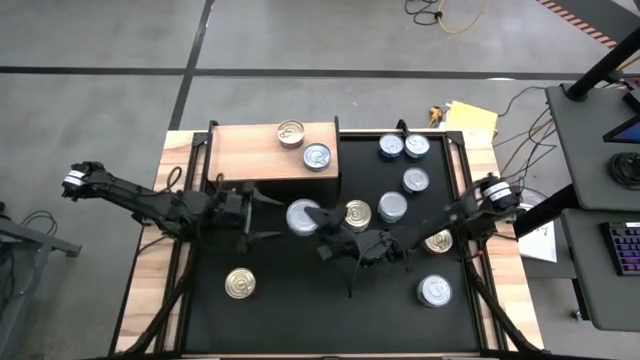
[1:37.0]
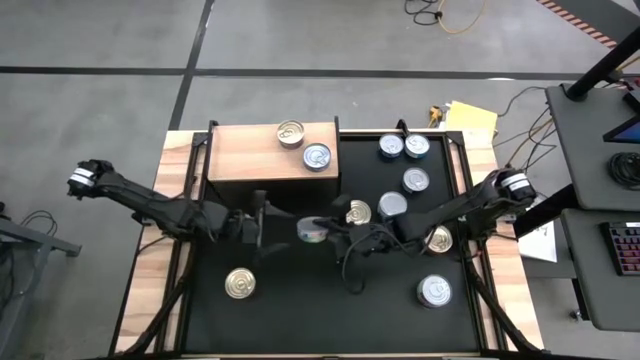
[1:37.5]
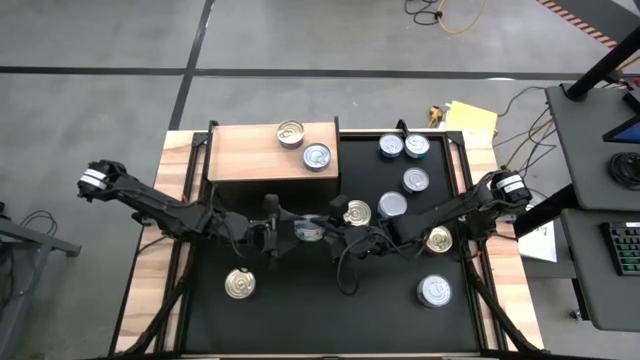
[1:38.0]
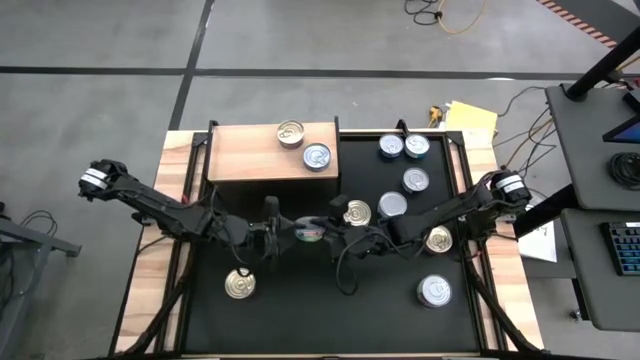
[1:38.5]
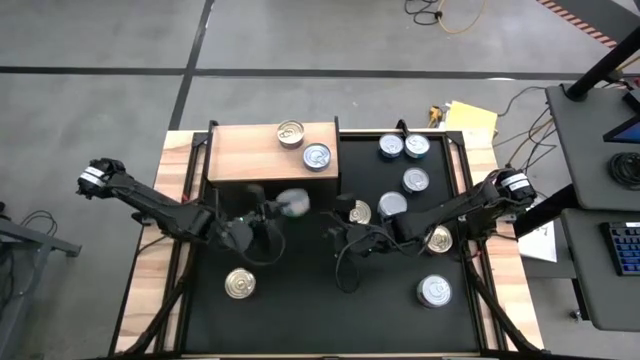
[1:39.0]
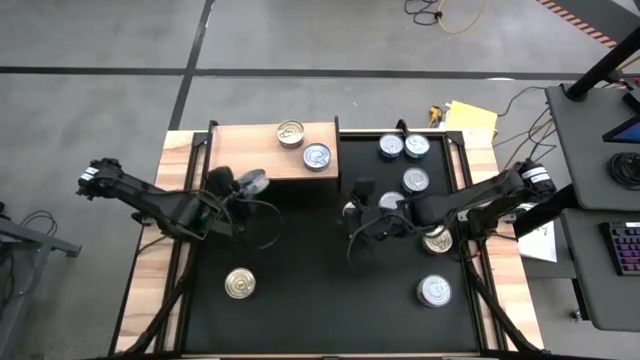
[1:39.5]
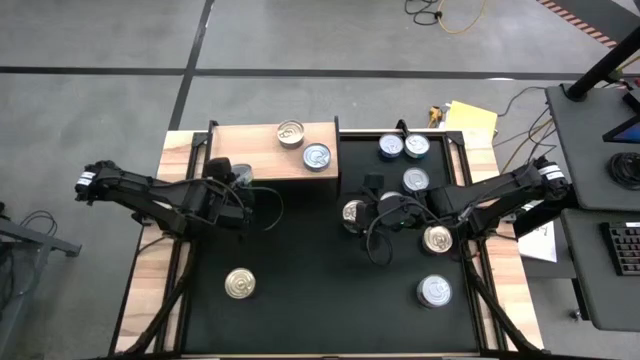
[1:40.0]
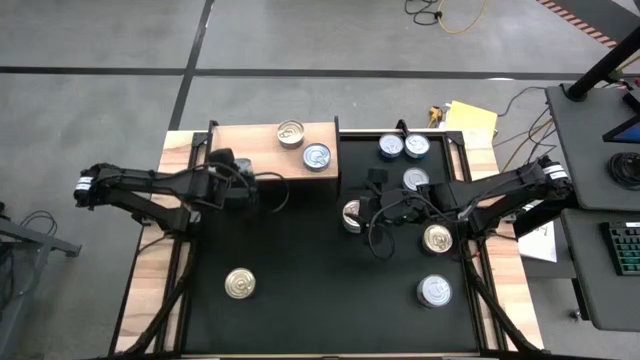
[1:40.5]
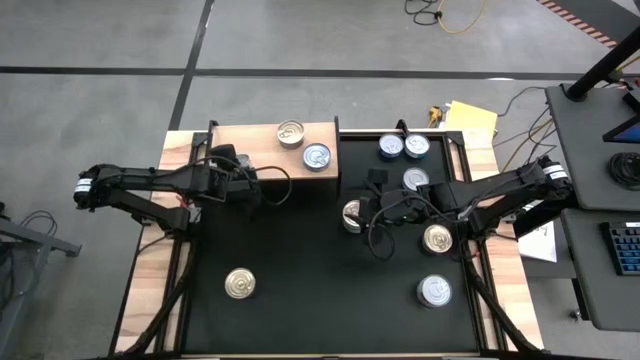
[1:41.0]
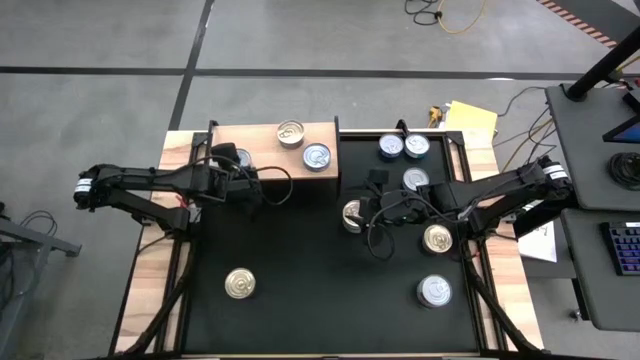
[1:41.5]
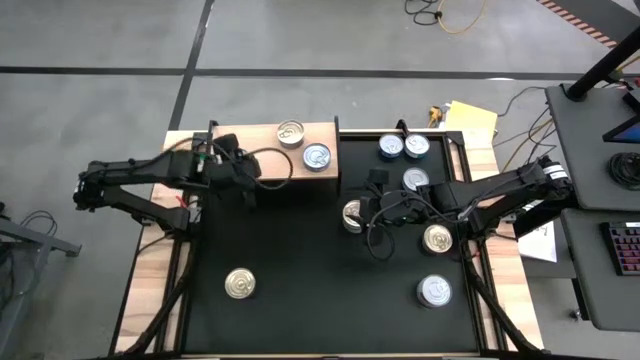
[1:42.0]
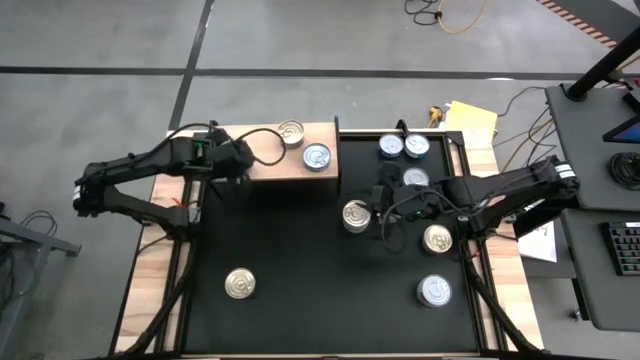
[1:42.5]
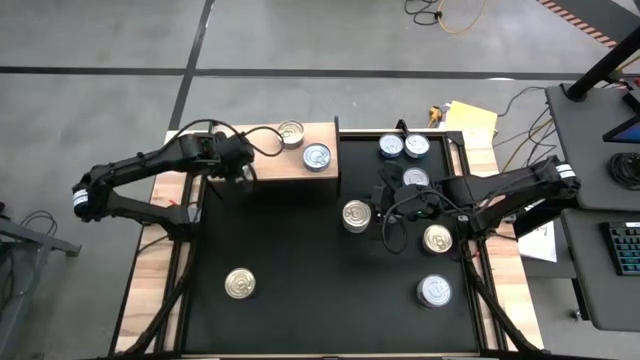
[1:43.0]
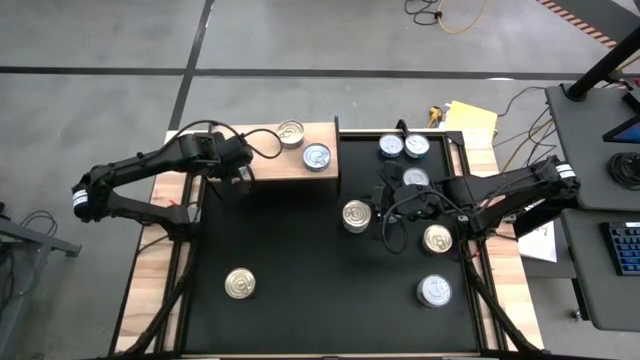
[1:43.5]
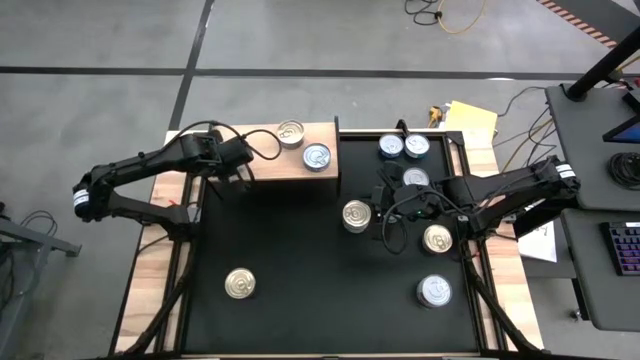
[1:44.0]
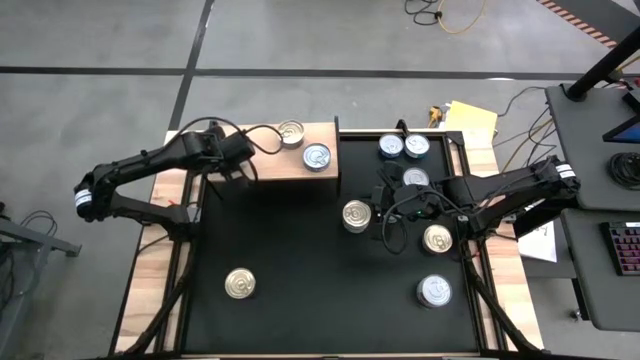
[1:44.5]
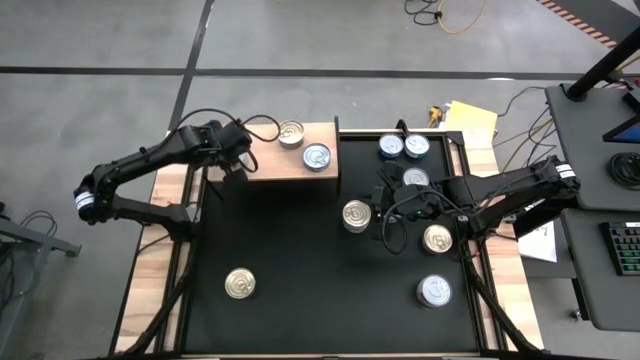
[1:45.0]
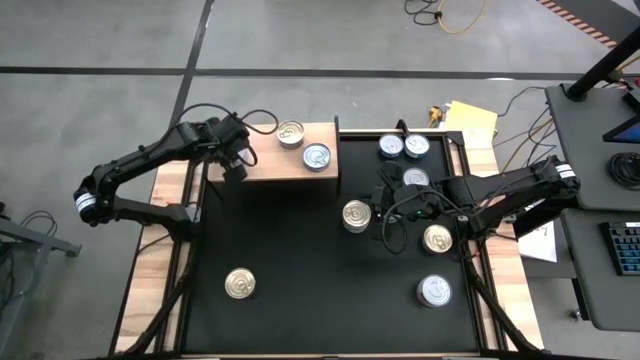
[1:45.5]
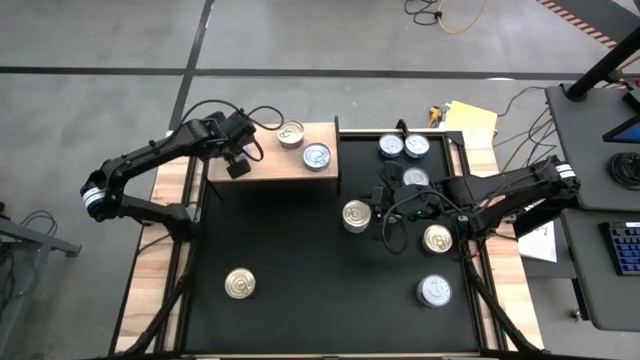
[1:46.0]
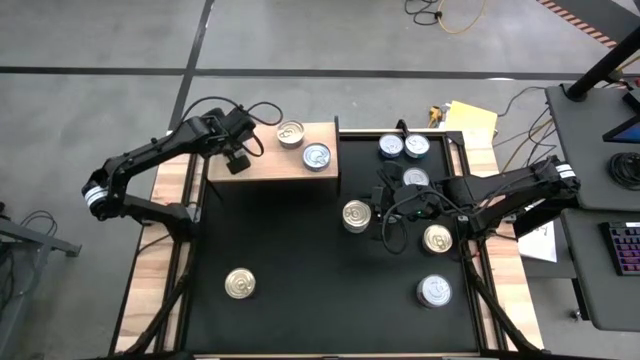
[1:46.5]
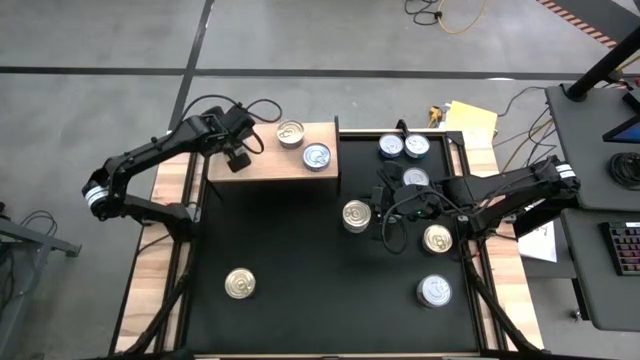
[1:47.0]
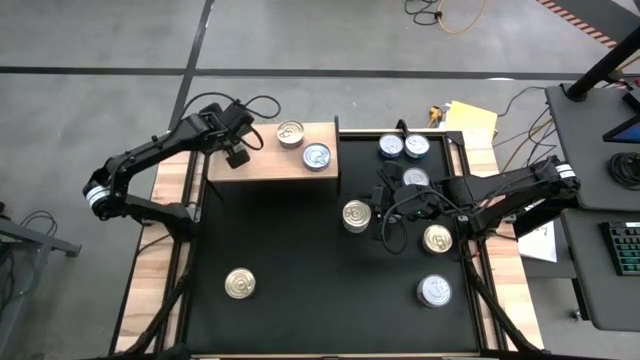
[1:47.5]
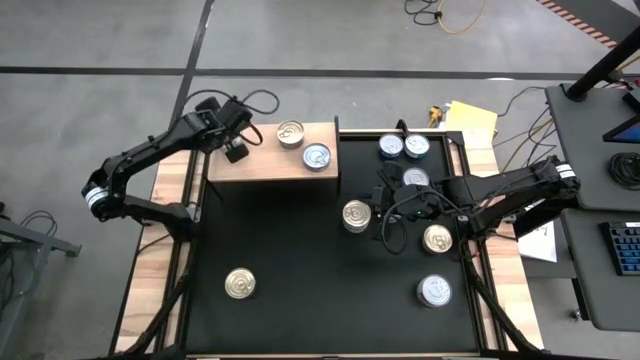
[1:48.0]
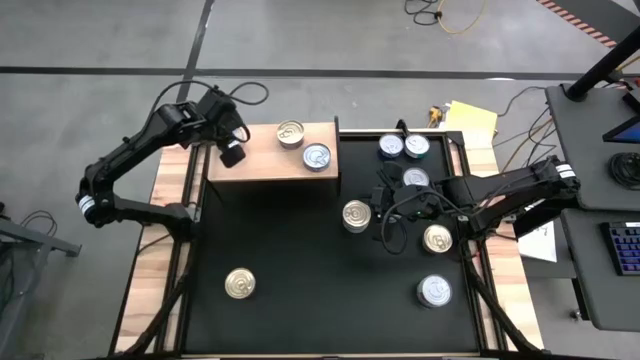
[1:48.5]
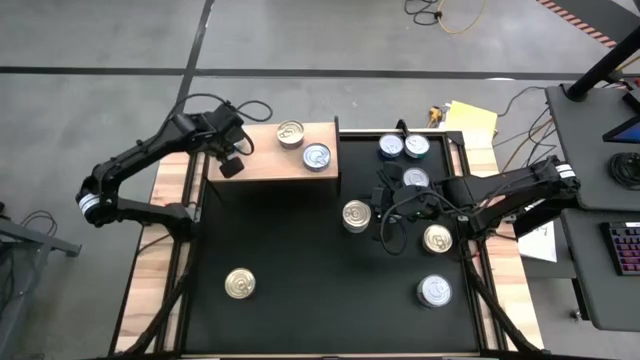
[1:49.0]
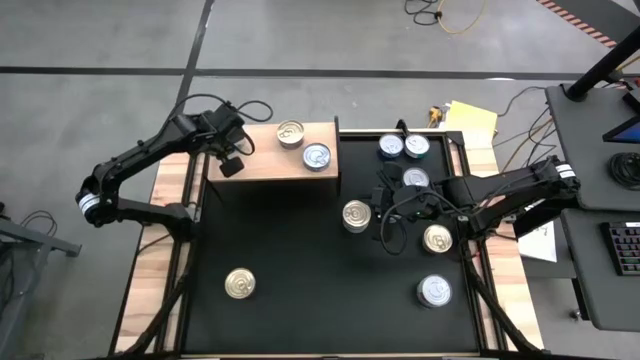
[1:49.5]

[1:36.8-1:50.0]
Task: Stack canned seafood by type on shelf
Put the green/white tuna can on the shelf

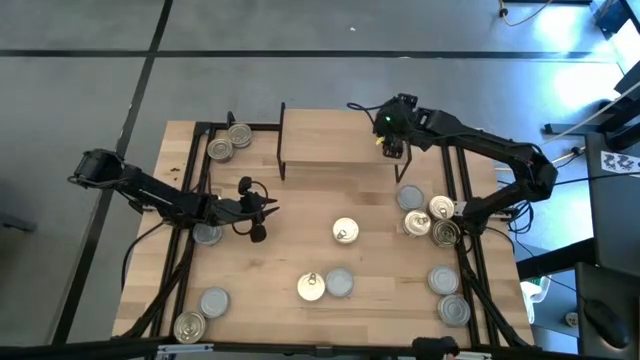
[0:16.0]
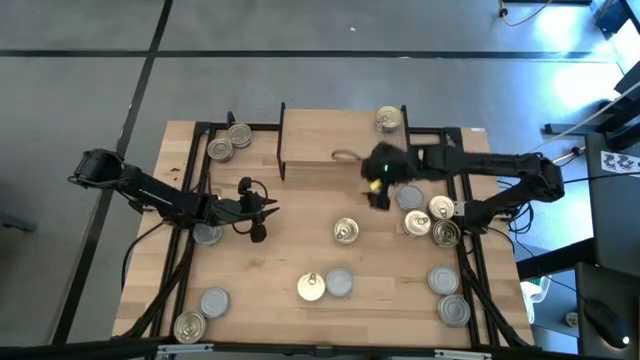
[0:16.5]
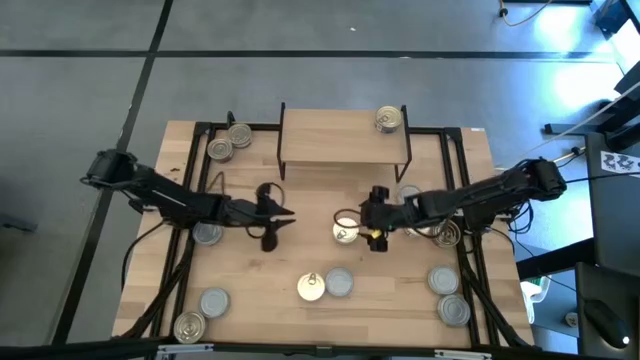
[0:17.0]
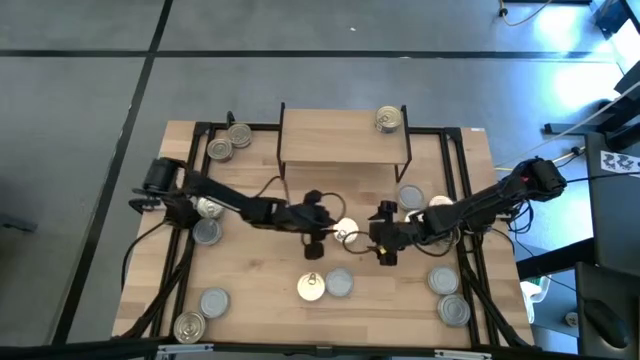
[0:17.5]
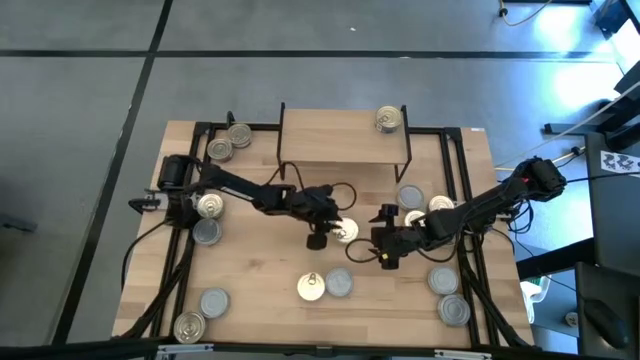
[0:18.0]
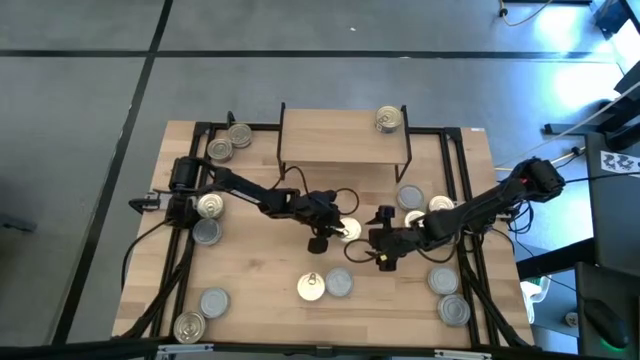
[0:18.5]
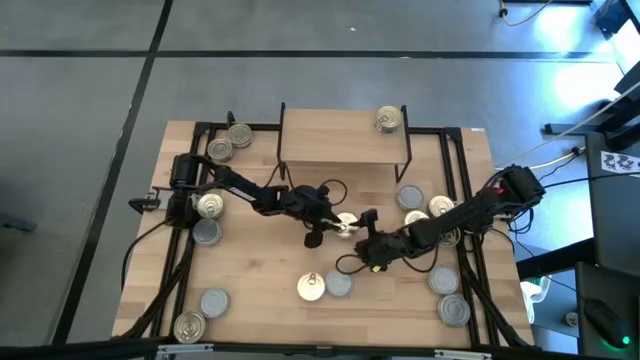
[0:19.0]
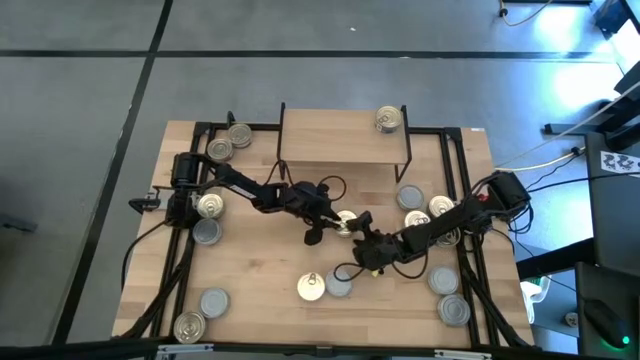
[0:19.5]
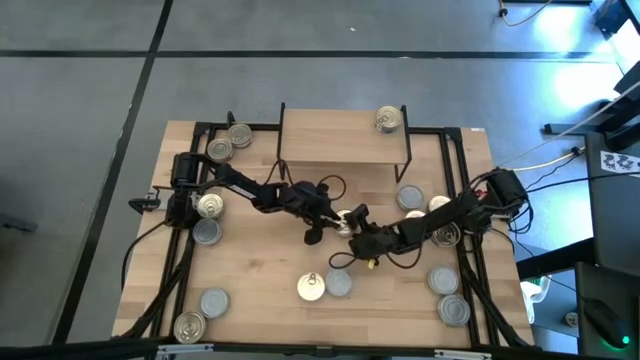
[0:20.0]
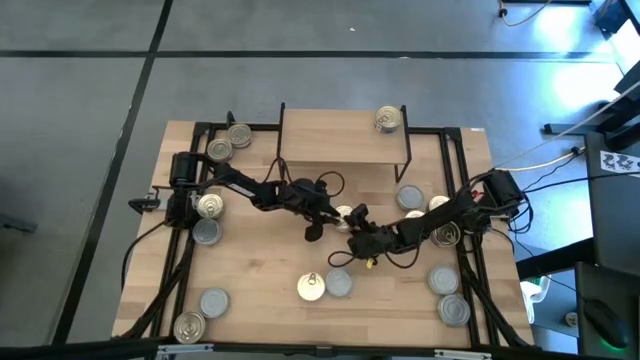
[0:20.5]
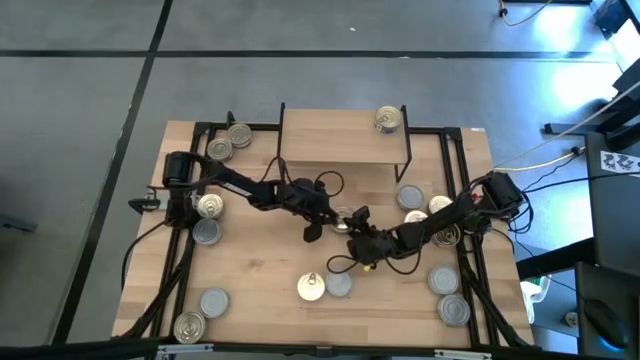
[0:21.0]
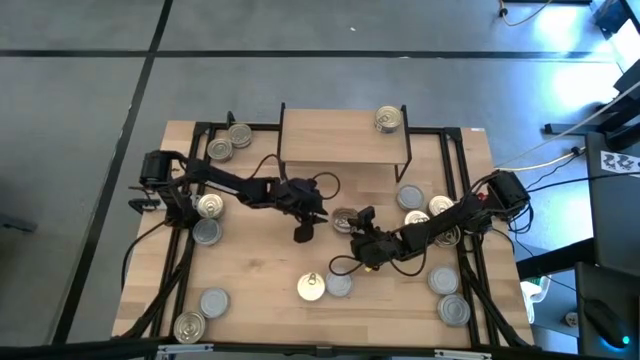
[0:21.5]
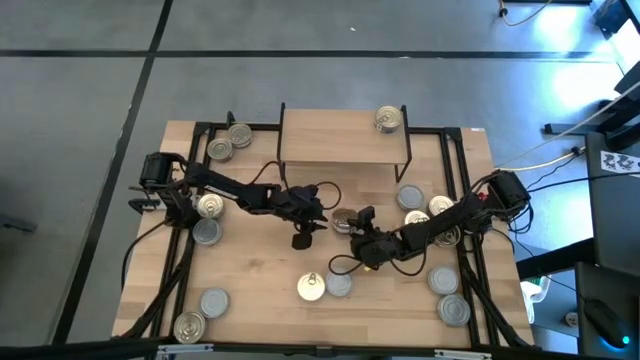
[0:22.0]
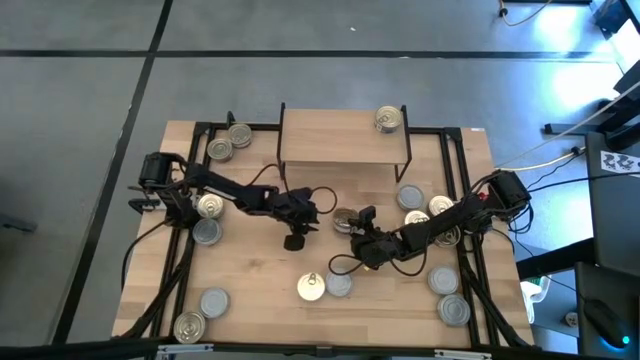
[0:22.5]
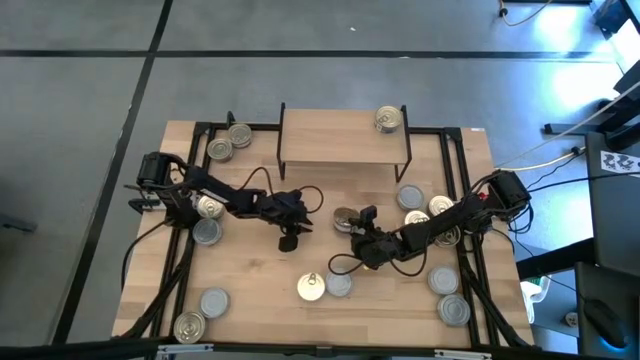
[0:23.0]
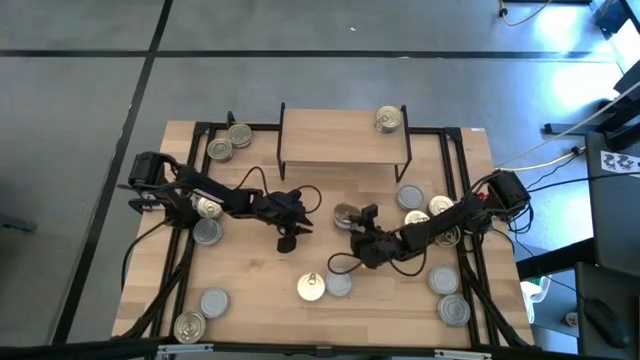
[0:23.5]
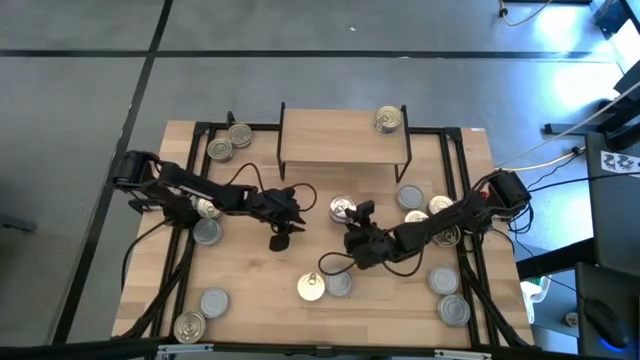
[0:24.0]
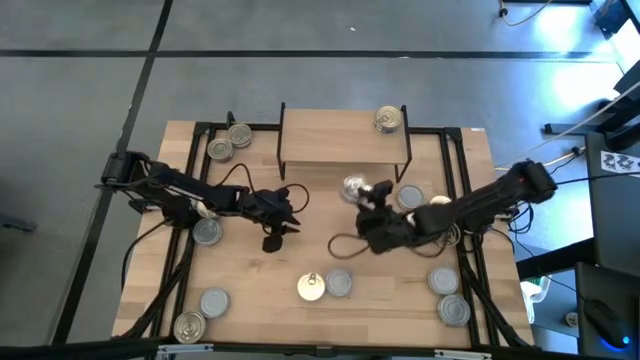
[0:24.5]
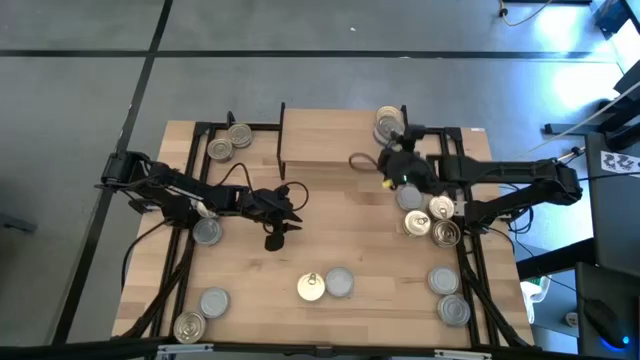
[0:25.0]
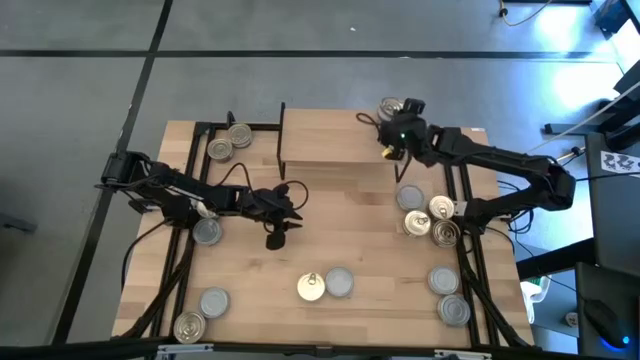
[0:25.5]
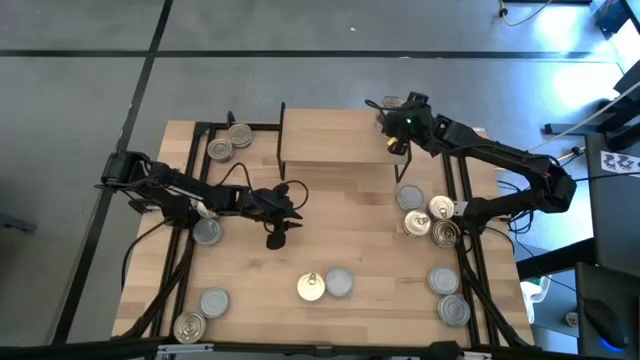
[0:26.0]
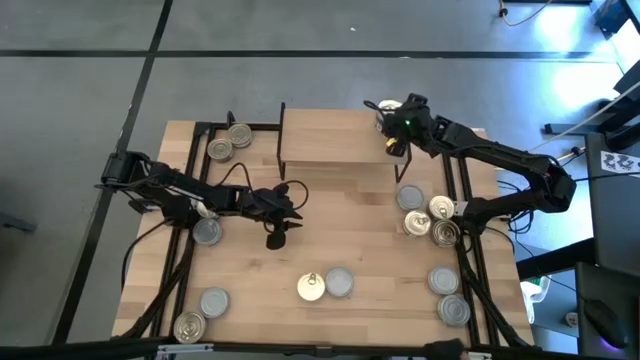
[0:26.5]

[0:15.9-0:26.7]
Task: Stack canned seafood by type on shelf
Stack the blue pink tuna can on top of the other blue pink tuna can on the shelf
